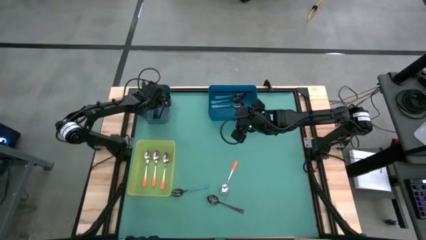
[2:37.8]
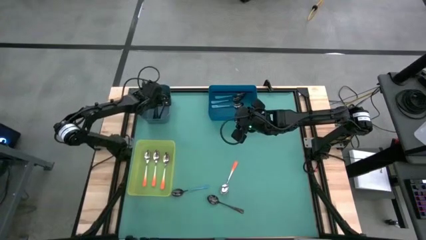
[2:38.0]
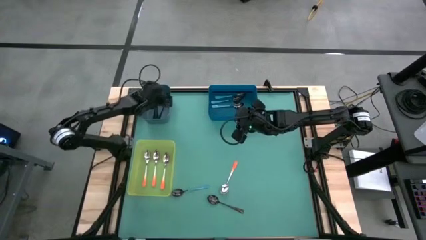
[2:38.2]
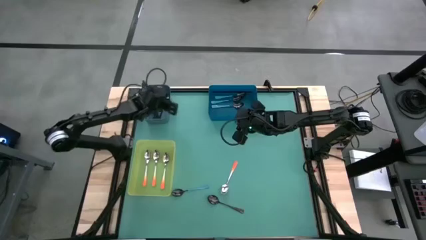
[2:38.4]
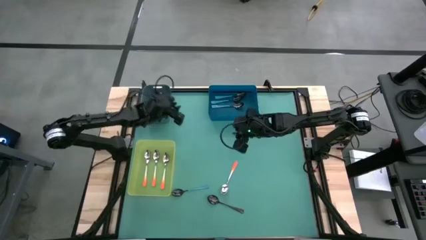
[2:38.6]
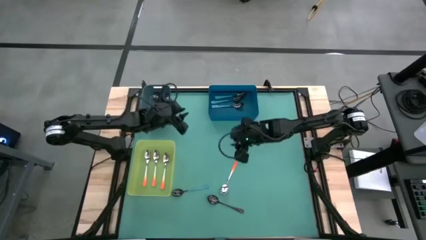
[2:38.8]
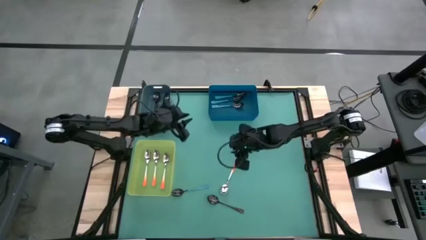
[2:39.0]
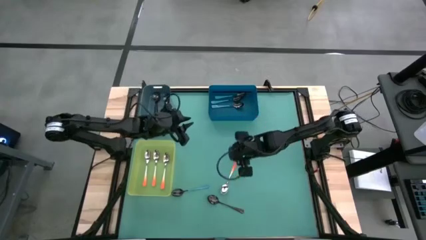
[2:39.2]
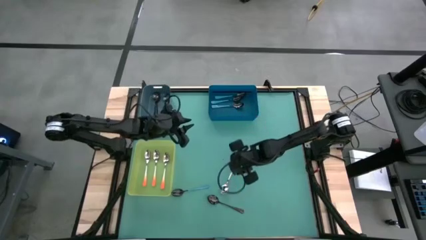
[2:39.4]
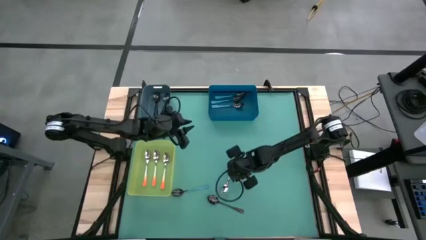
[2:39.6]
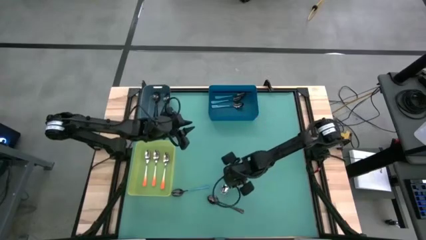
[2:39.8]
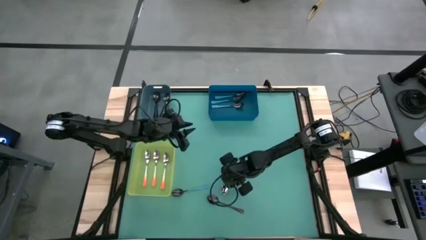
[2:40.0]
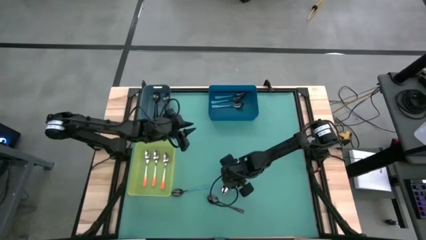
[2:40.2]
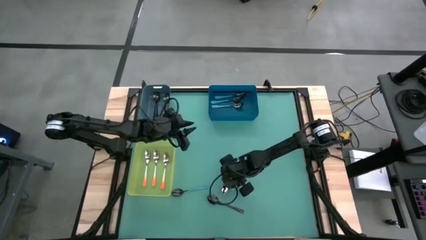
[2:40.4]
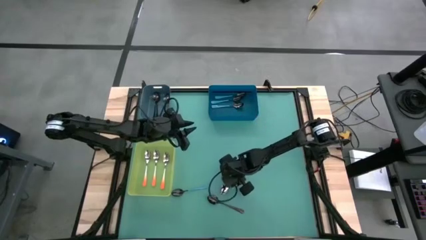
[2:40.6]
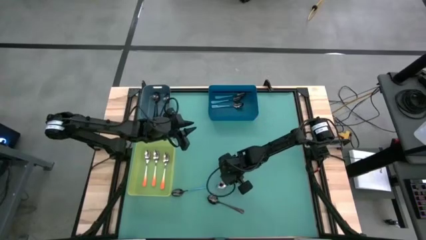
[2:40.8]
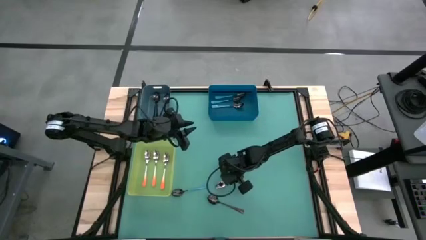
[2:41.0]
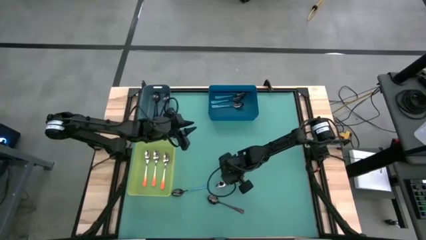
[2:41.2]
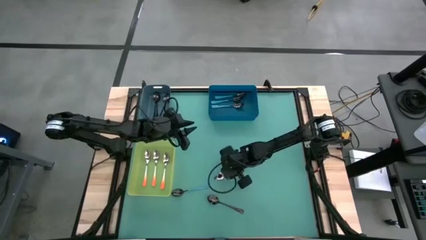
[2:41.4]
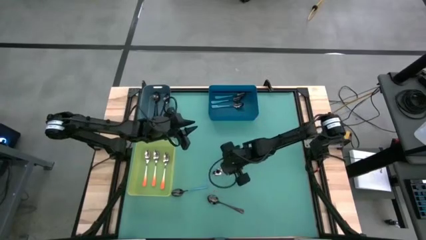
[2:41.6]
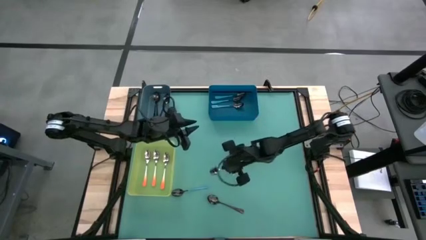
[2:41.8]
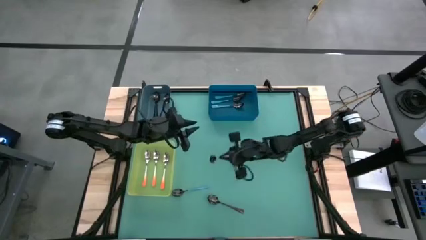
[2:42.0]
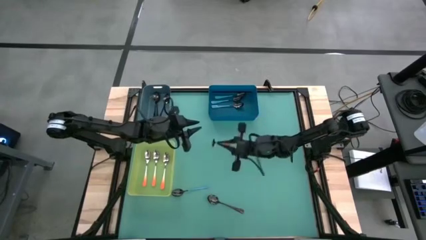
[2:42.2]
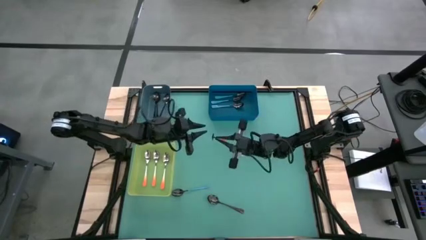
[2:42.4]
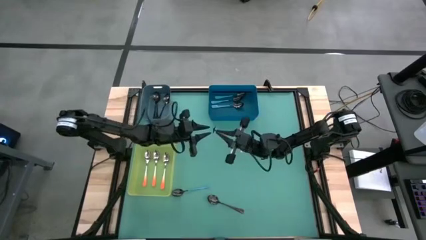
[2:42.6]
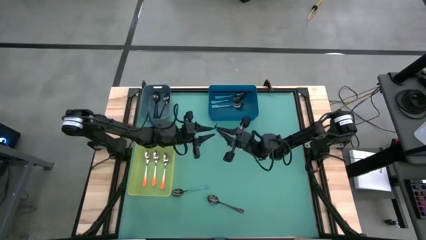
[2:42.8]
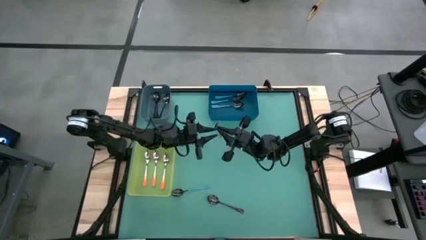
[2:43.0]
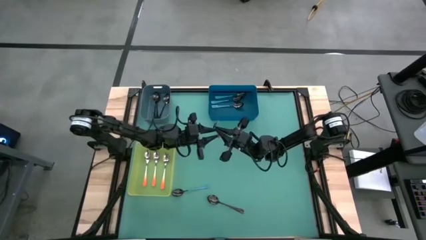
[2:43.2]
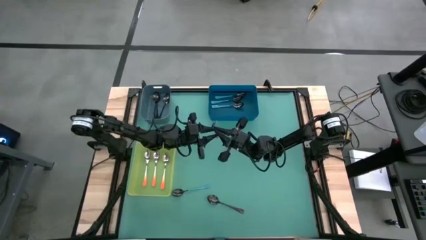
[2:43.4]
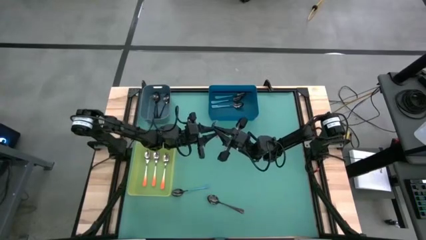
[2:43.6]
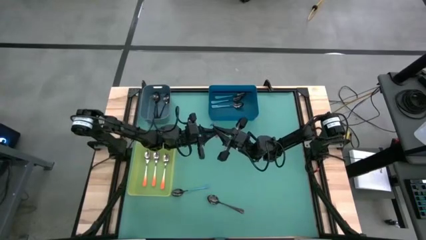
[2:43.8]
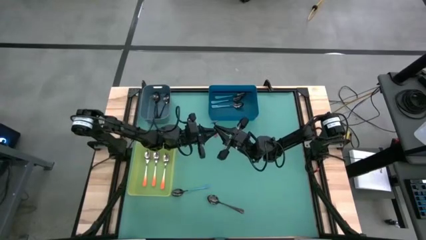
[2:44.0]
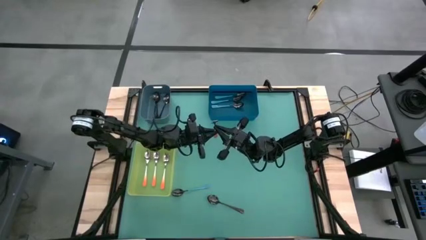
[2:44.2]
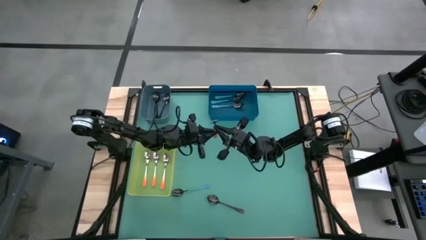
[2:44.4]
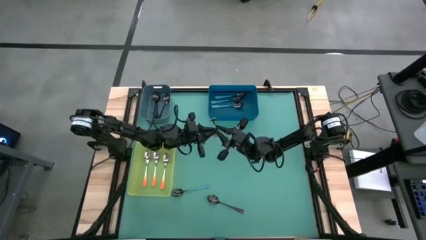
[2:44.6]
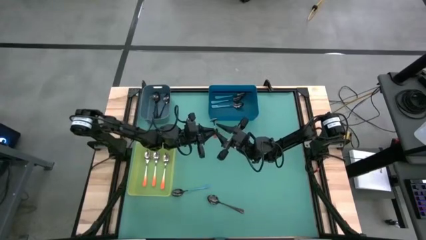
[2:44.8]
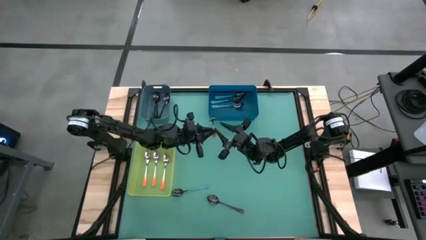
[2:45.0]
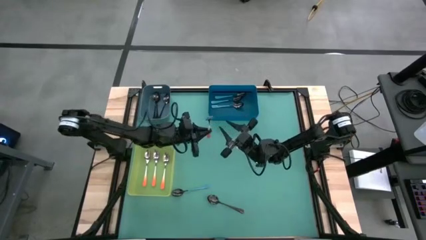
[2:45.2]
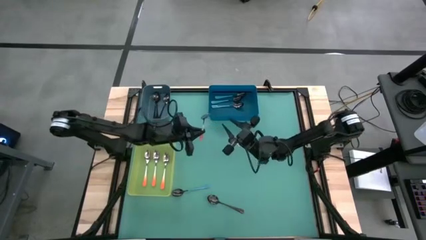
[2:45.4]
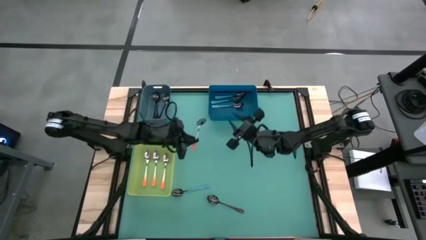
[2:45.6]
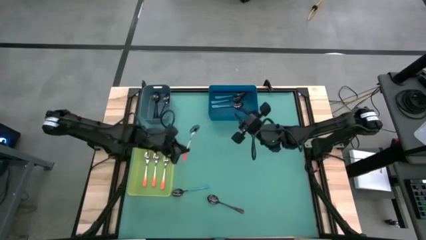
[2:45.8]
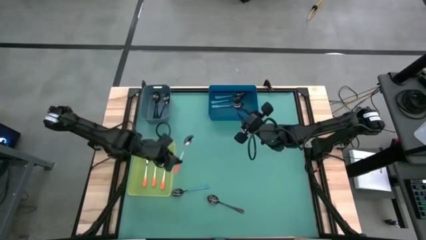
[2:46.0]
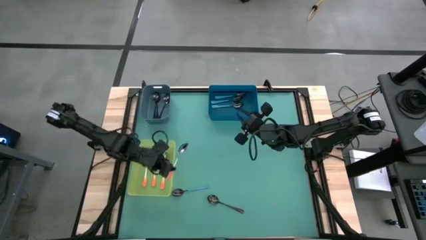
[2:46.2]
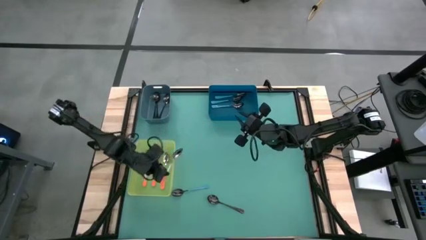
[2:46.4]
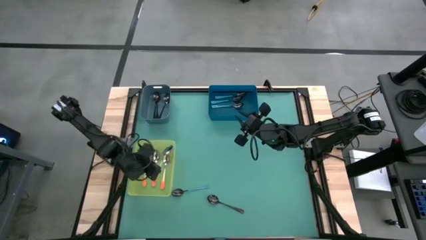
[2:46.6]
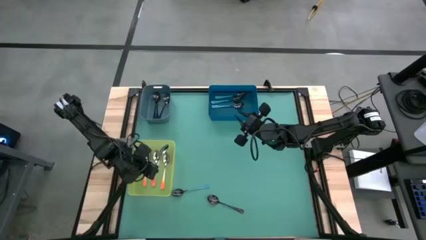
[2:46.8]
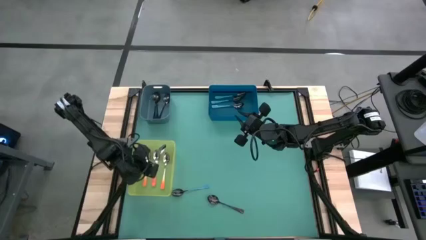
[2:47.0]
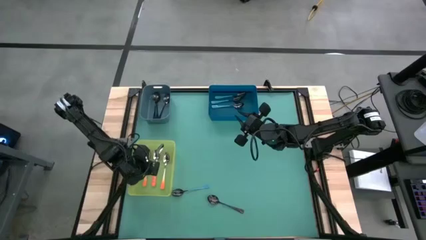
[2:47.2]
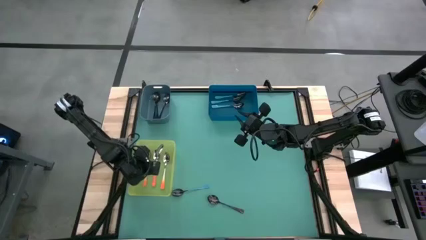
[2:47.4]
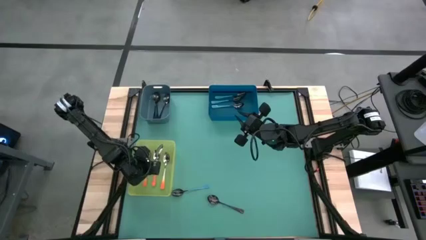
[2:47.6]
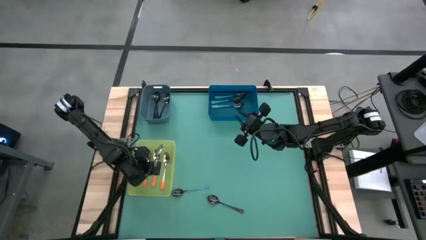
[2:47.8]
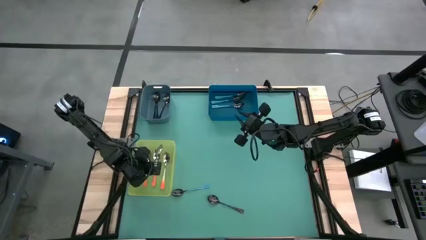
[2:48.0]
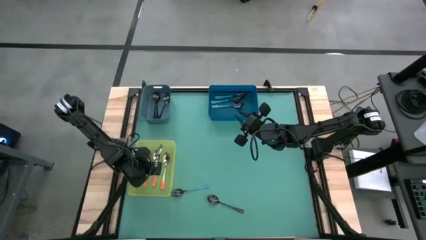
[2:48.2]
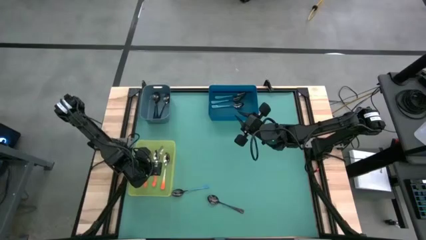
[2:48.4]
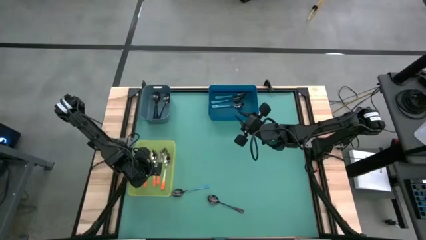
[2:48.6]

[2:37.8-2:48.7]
Task: Sort silverware by color (type)
Put the orange spoon into the yellow bin
